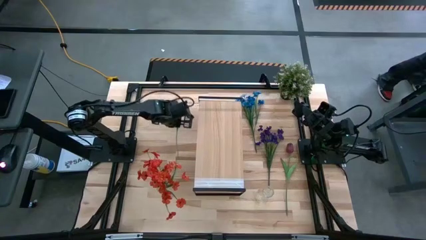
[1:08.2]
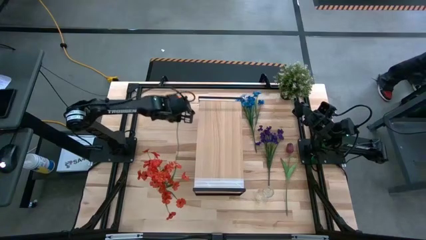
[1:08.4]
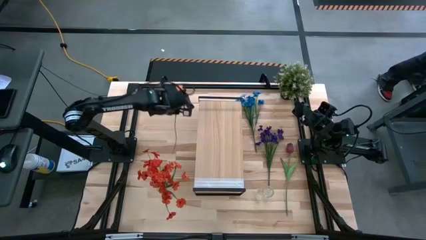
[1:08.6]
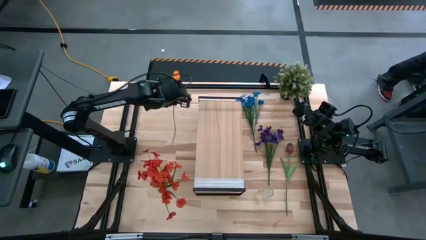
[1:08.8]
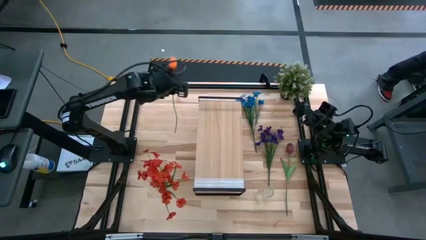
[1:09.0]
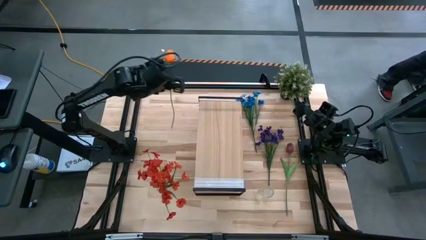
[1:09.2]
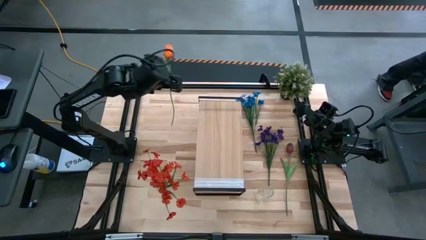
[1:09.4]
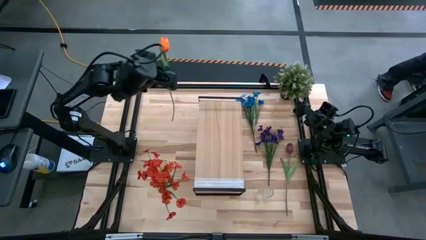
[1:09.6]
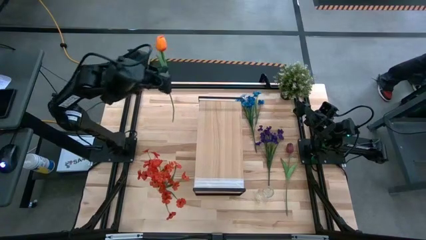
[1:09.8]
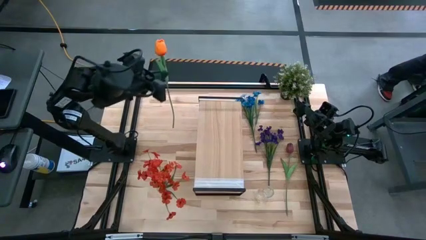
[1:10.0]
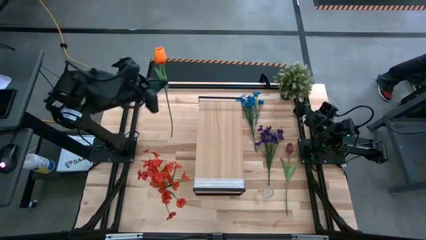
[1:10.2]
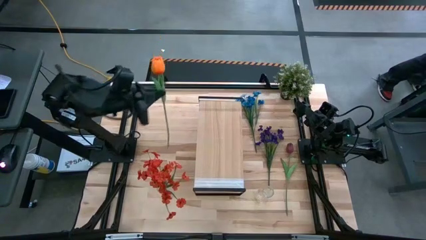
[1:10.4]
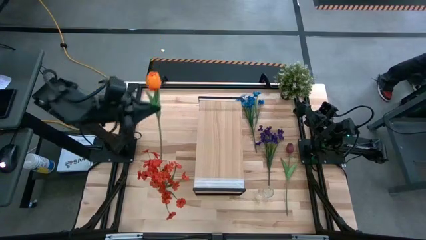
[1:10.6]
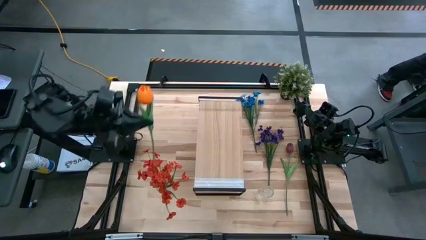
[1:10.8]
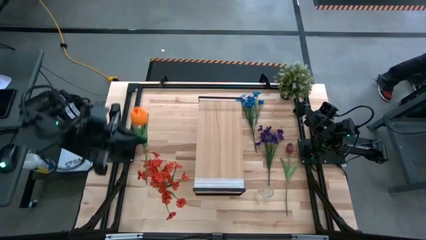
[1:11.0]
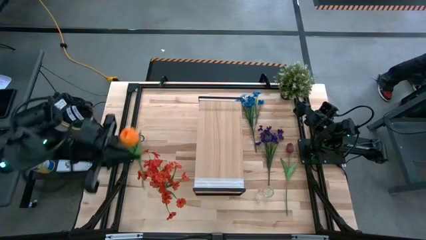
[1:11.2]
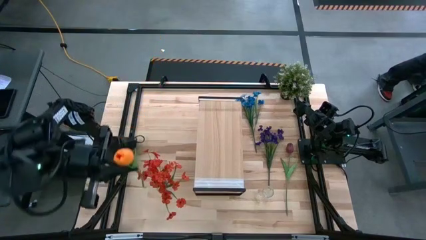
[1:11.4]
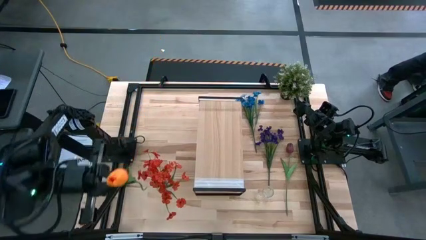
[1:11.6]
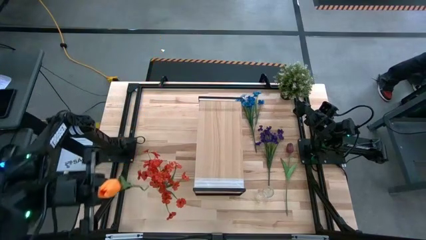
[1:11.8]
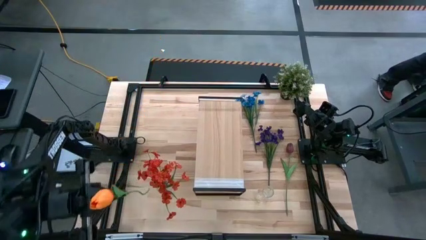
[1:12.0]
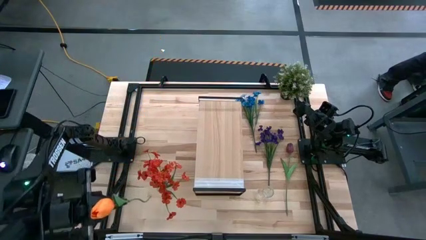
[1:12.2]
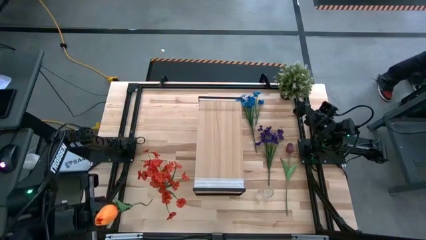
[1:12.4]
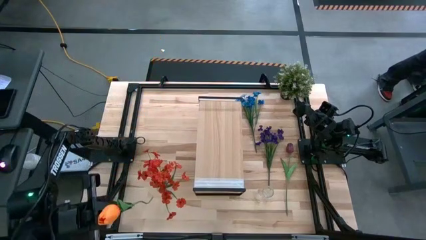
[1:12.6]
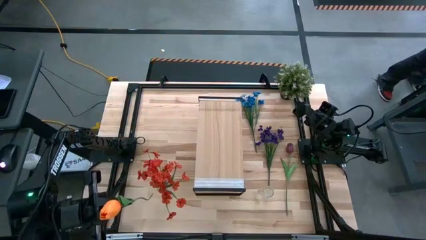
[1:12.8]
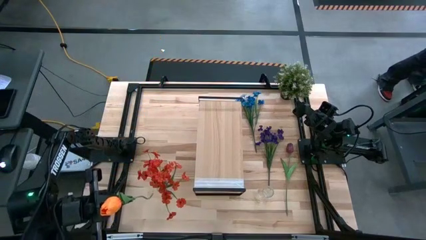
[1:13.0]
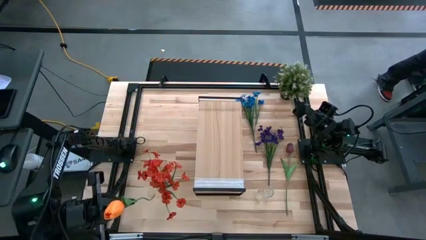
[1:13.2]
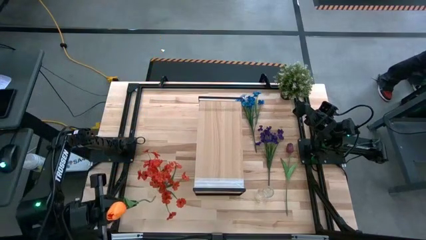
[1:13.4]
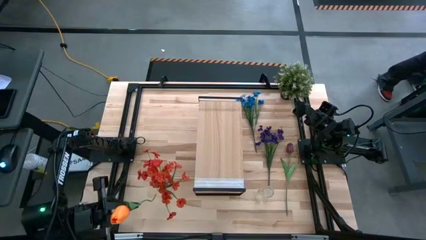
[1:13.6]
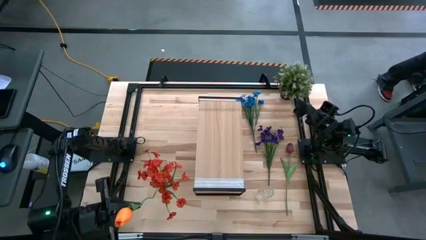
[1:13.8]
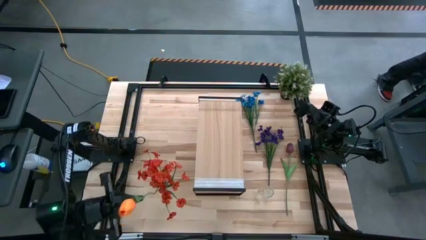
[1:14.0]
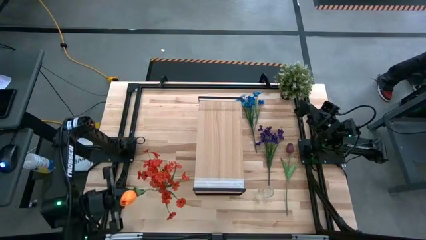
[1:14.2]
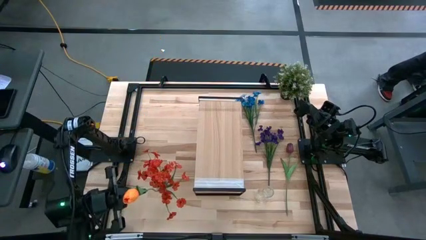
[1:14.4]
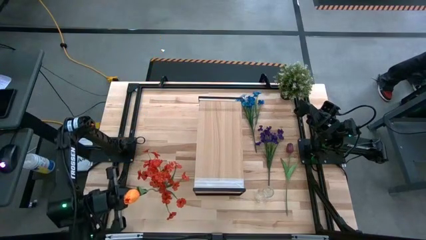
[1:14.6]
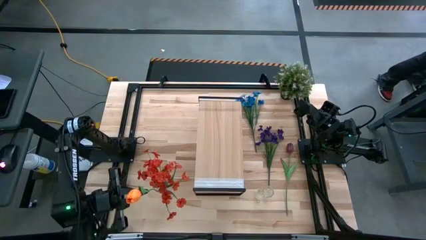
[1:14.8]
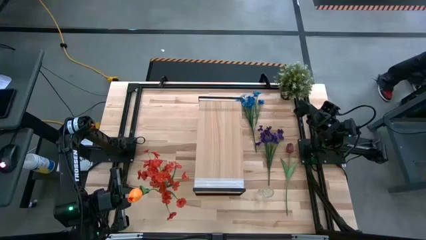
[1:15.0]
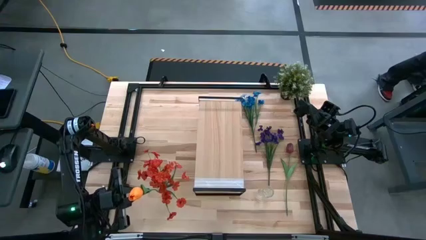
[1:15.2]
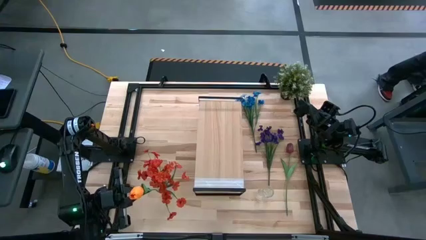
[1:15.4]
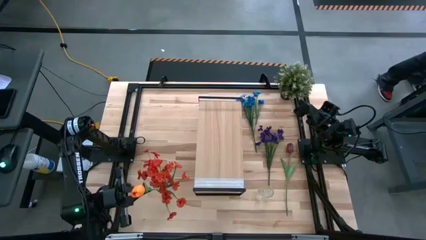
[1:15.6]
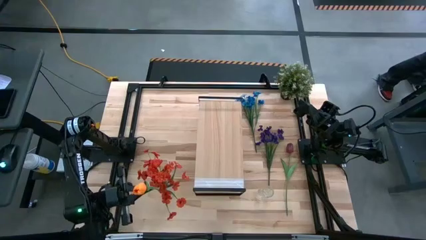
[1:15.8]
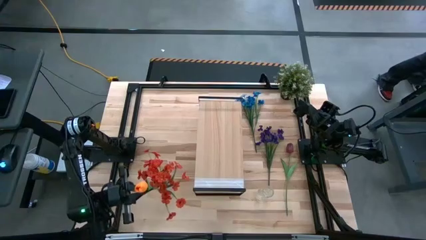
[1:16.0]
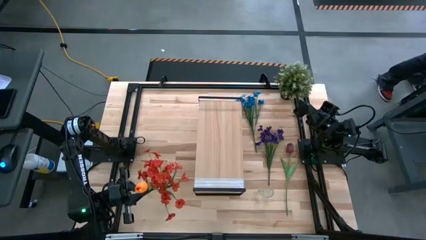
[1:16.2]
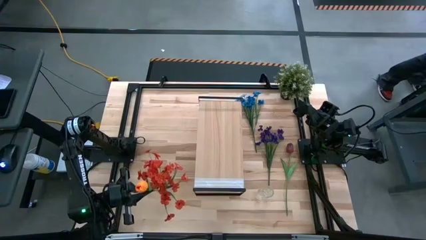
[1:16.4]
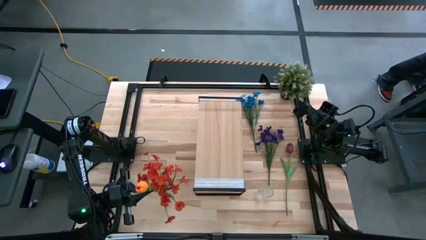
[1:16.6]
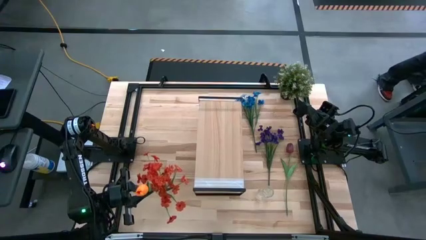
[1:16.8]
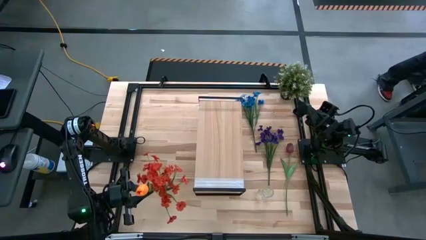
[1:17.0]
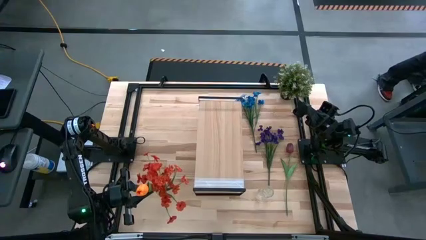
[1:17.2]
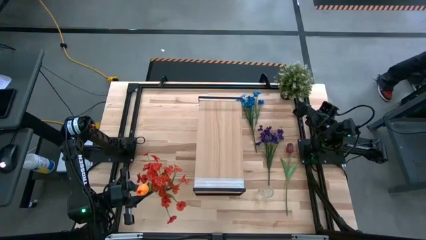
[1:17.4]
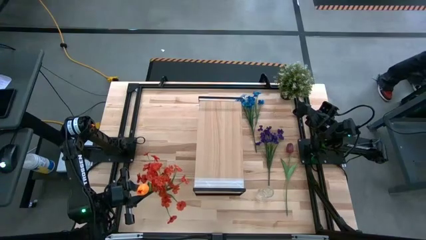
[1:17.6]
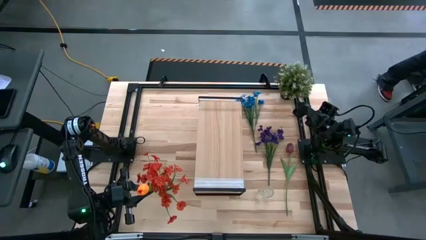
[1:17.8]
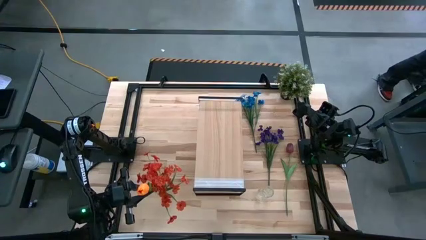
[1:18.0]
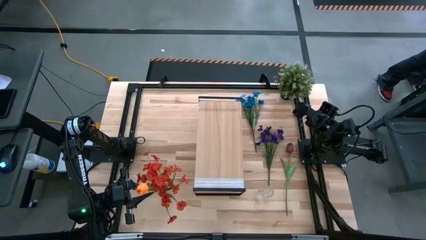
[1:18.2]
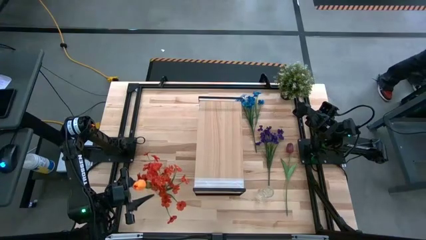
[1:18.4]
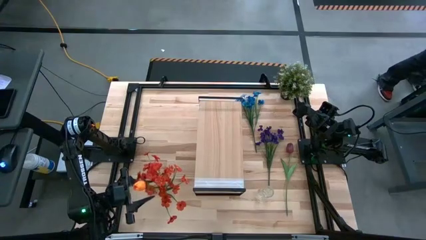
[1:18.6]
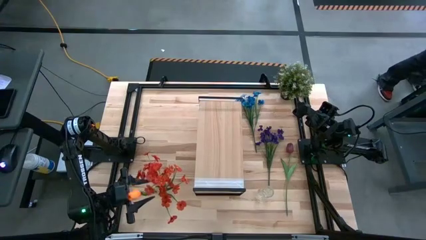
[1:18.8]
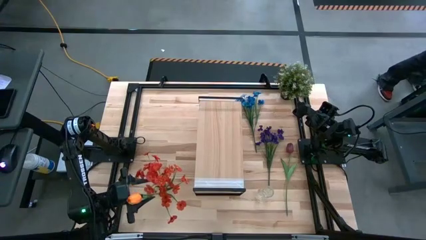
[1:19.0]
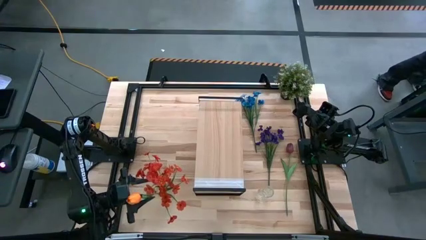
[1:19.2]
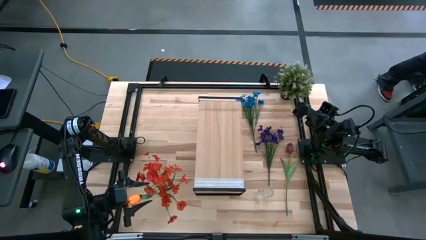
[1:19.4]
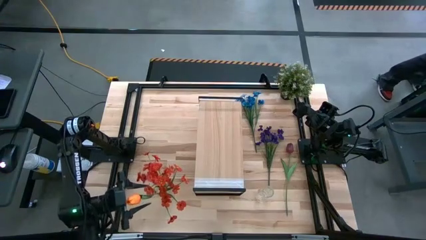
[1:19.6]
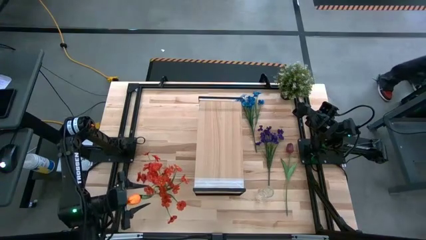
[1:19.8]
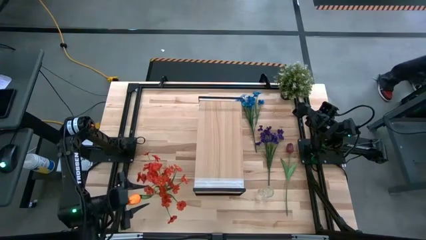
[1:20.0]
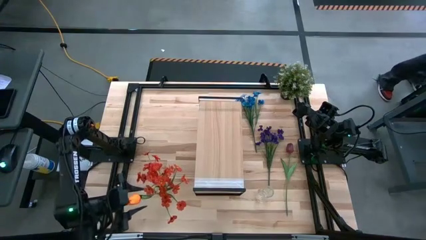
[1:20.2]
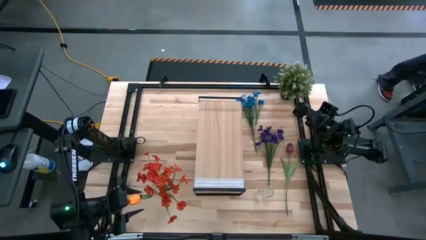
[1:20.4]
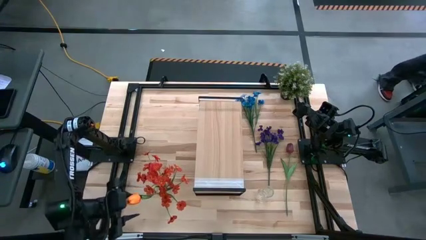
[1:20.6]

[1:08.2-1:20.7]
Task: Pick and place flowers into a vace then onto a shelf
Put the light orange flower into the left transparent vase

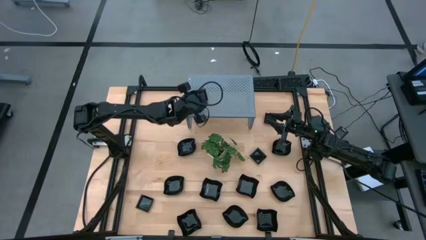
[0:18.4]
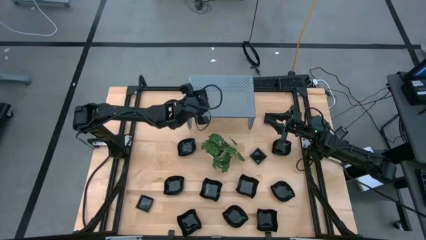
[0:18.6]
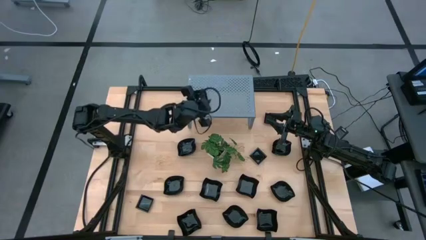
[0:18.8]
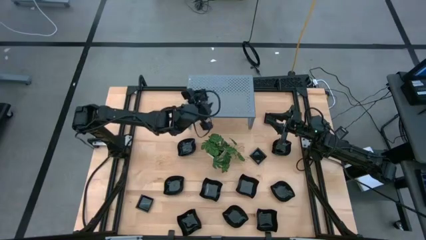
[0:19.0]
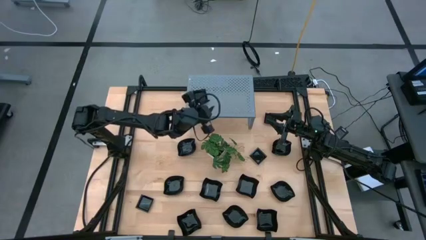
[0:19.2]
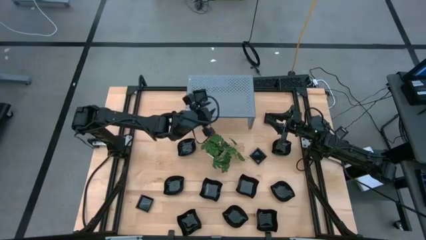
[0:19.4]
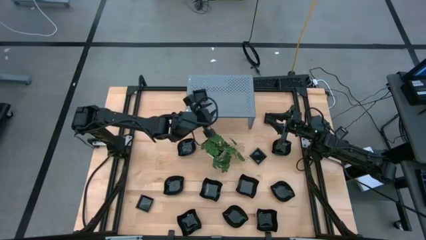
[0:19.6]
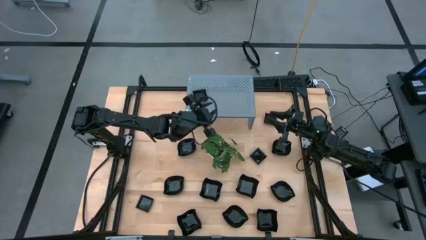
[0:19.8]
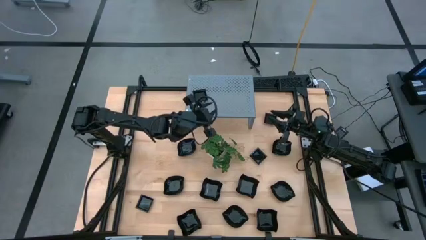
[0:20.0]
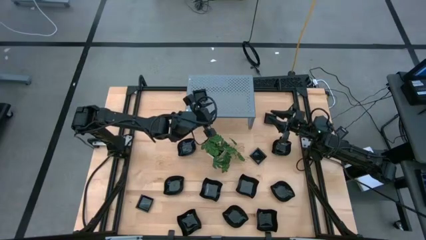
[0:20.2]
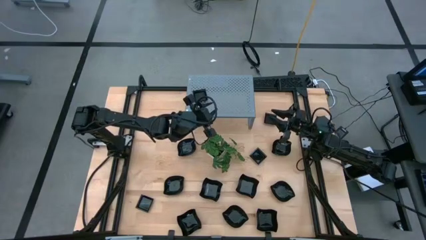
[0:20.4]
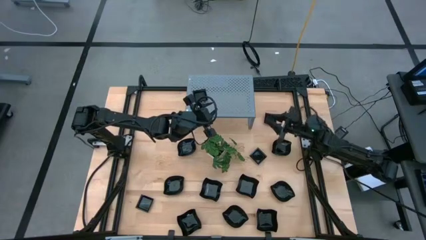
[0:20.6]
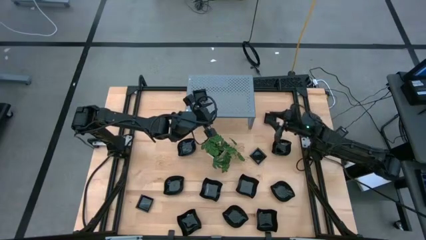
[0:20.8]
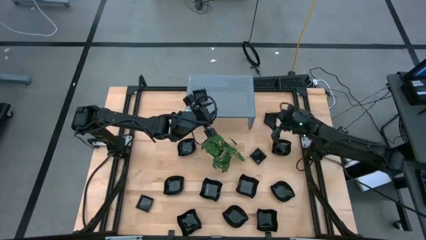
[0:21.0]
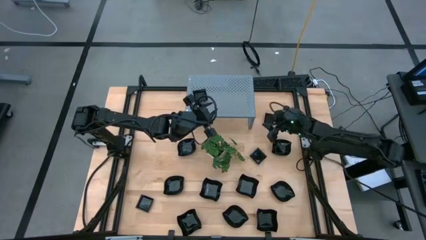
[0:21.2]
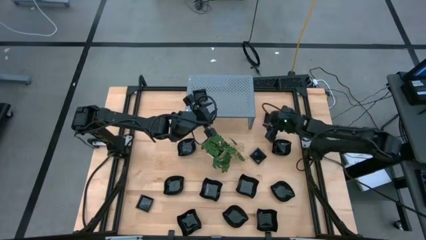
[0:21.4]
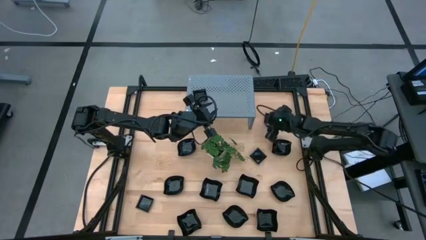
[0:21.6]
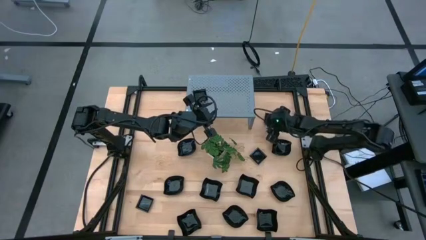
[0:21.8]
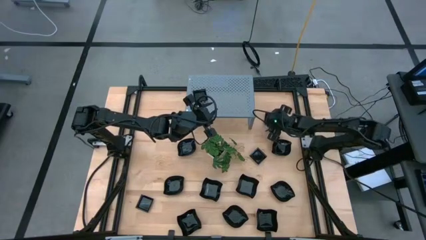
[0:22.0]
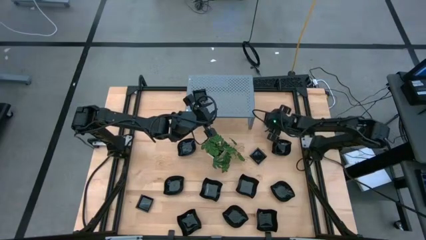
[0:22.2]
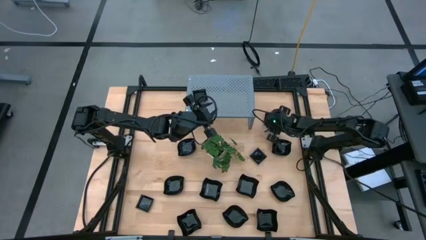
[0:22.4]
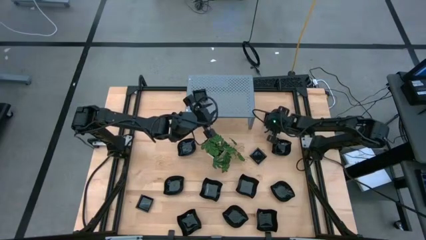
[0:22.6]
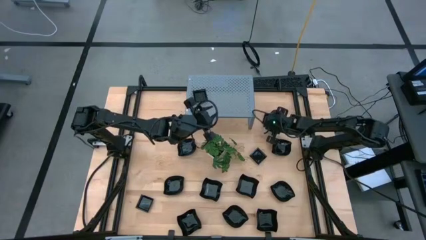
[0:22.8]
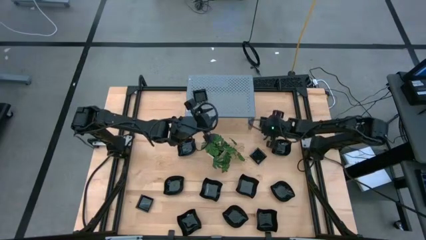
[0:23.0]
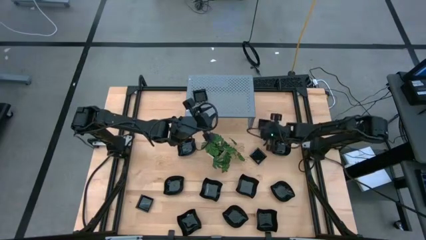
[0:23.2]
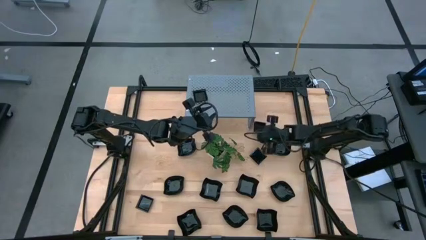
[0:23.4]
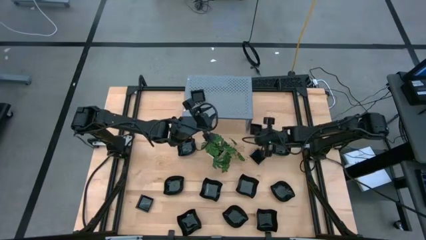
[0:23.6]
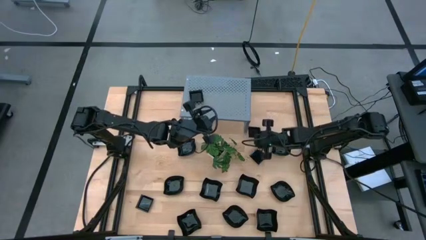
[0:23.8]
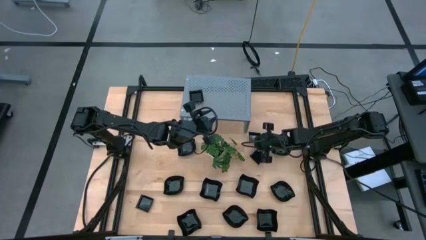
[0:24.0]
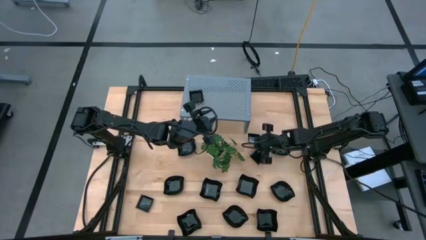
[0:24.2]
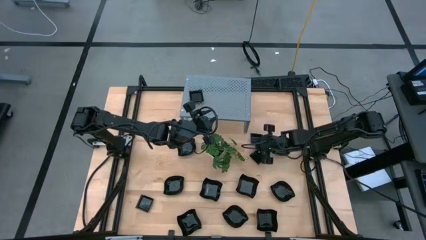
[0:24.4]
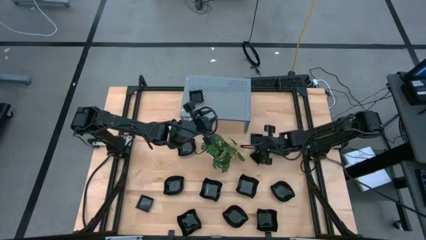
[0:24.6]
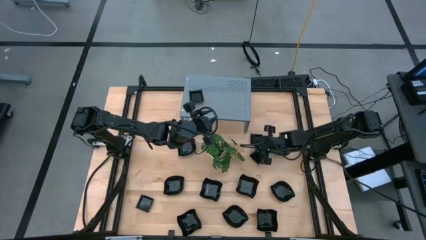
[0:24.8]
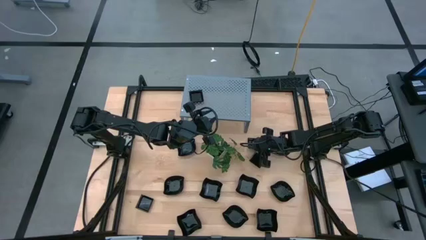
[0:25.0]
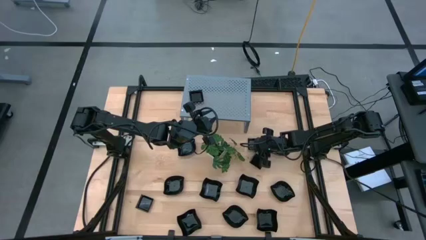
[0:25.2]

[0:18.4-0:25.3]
Task: Pick & Place Mini shaped plates
Stack the black square plate on top of the other black square plate on the shelf
